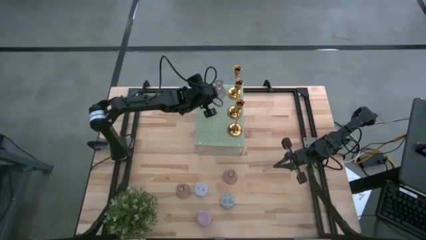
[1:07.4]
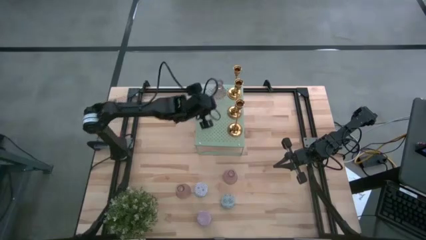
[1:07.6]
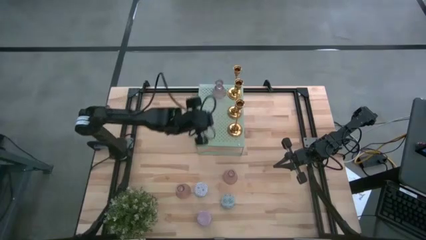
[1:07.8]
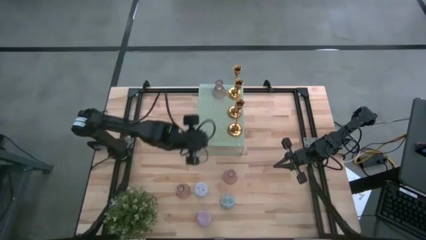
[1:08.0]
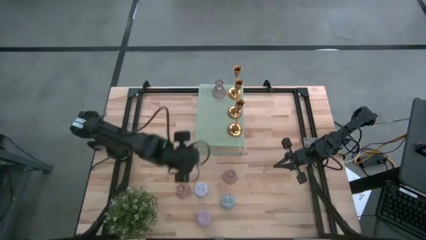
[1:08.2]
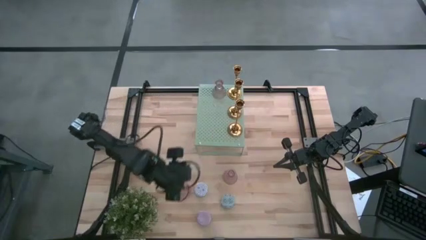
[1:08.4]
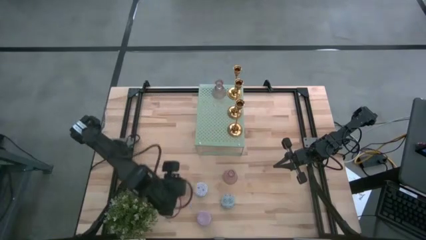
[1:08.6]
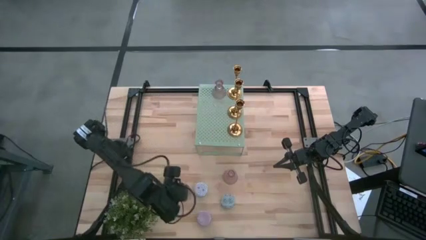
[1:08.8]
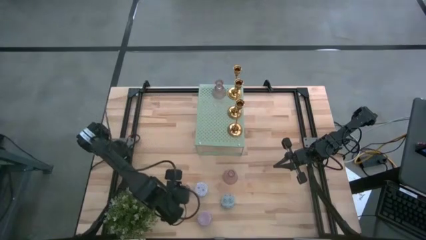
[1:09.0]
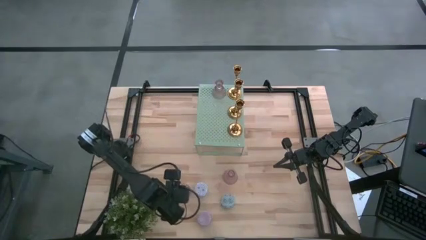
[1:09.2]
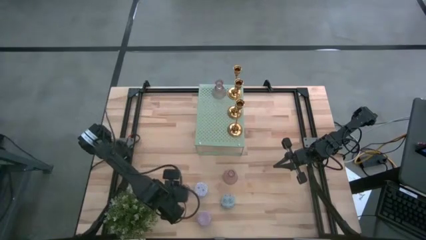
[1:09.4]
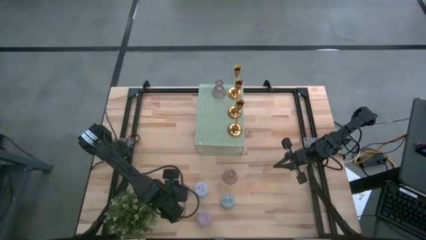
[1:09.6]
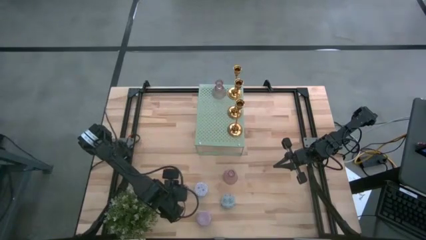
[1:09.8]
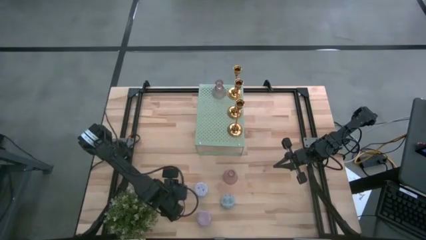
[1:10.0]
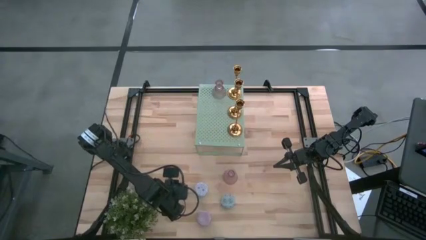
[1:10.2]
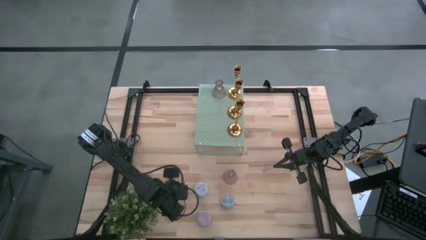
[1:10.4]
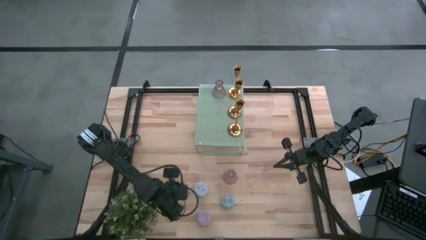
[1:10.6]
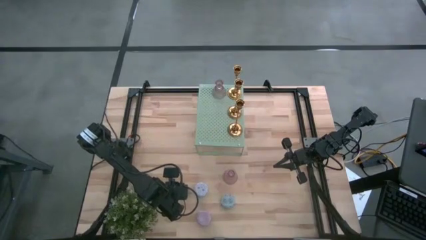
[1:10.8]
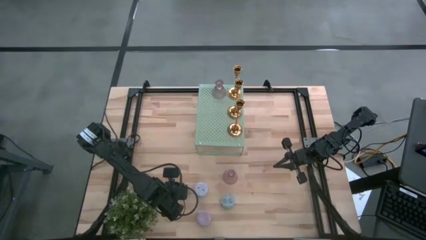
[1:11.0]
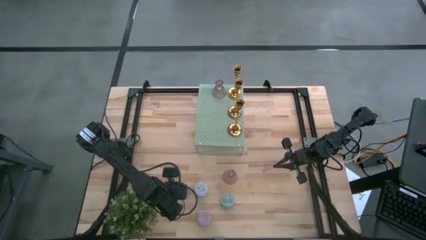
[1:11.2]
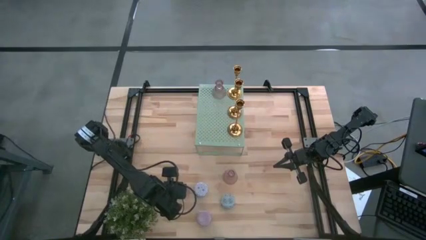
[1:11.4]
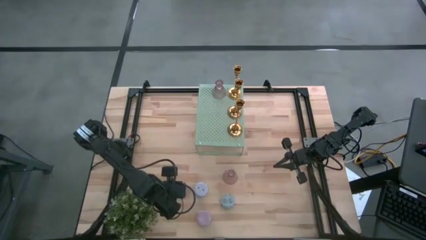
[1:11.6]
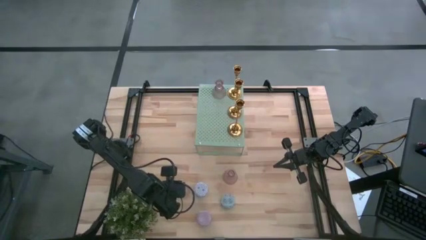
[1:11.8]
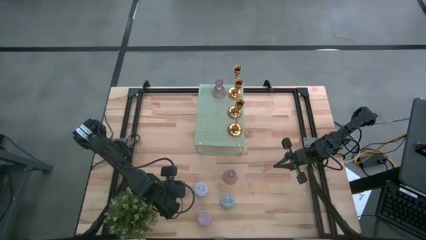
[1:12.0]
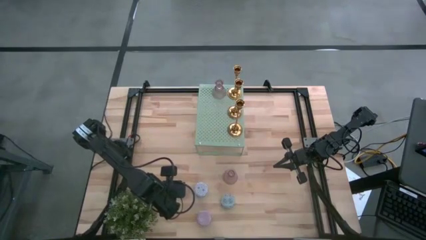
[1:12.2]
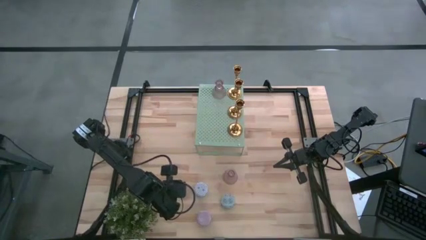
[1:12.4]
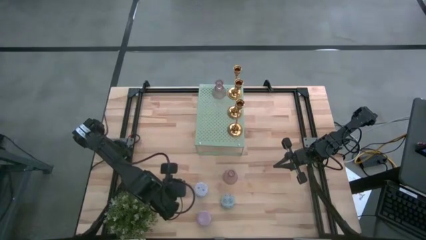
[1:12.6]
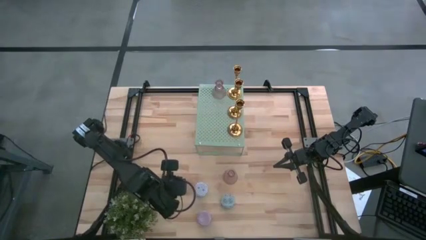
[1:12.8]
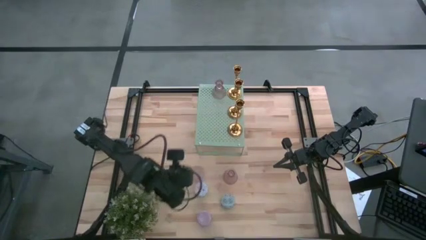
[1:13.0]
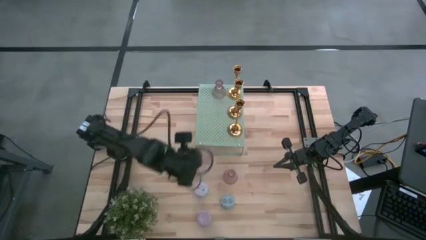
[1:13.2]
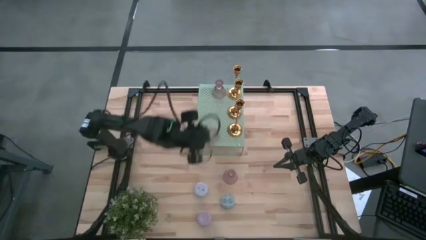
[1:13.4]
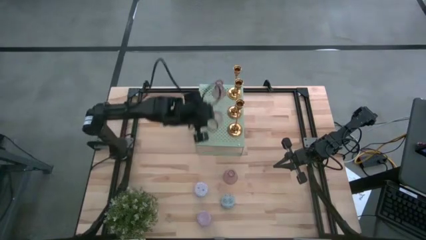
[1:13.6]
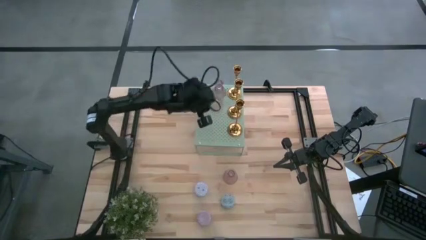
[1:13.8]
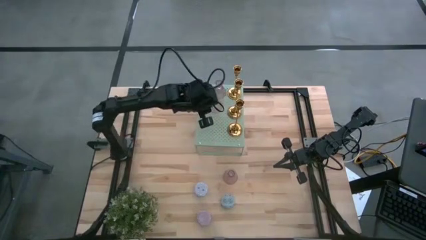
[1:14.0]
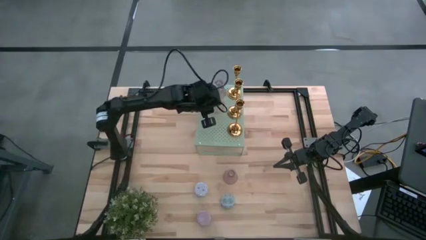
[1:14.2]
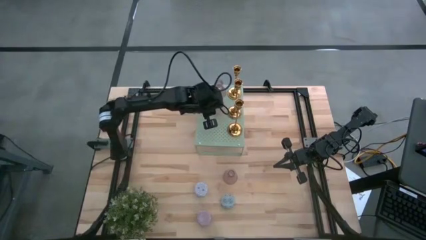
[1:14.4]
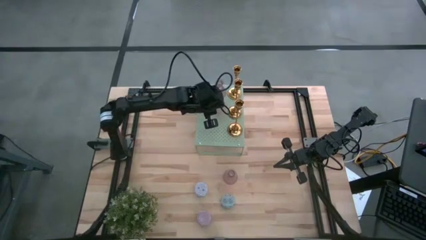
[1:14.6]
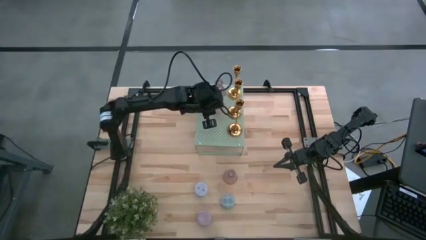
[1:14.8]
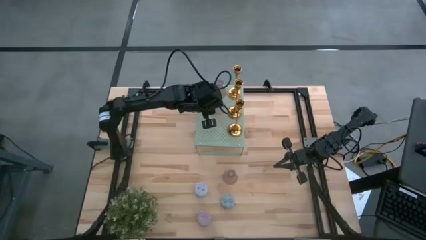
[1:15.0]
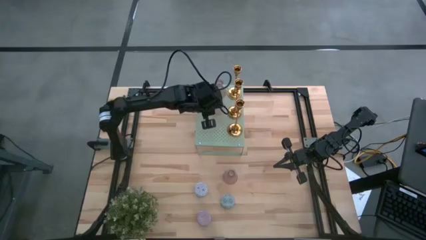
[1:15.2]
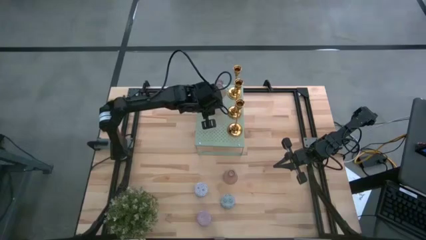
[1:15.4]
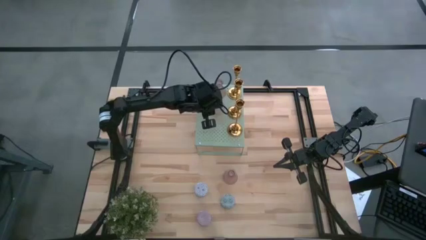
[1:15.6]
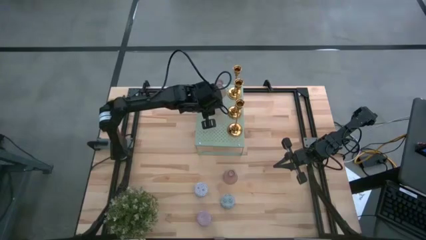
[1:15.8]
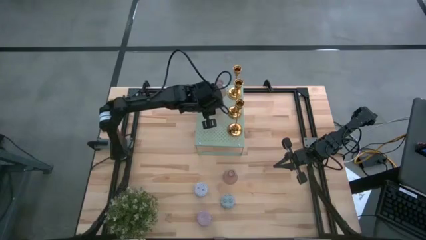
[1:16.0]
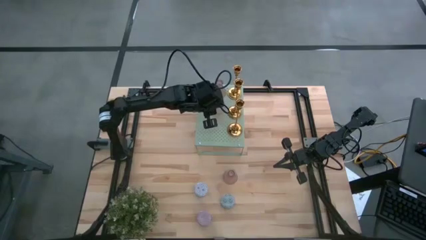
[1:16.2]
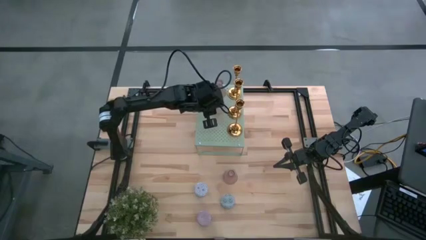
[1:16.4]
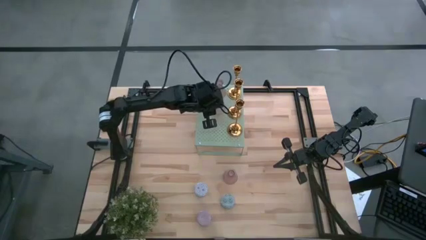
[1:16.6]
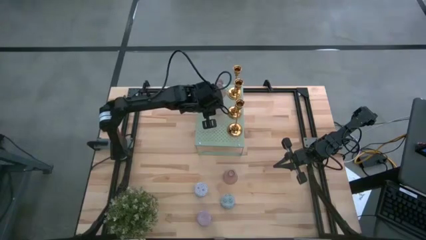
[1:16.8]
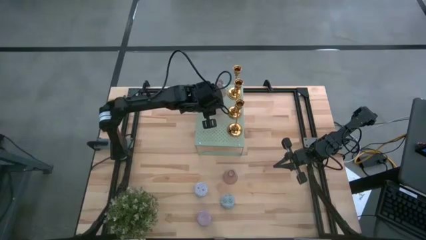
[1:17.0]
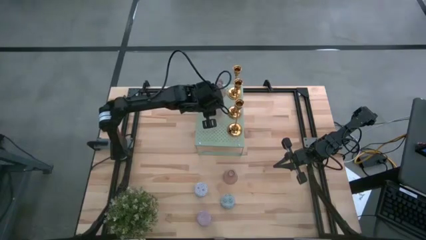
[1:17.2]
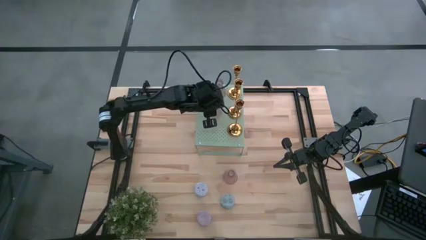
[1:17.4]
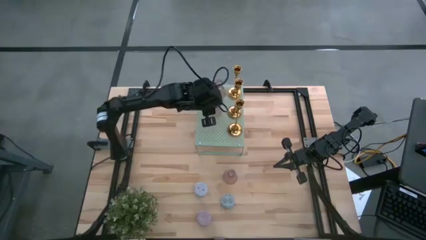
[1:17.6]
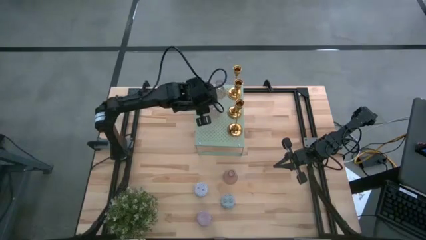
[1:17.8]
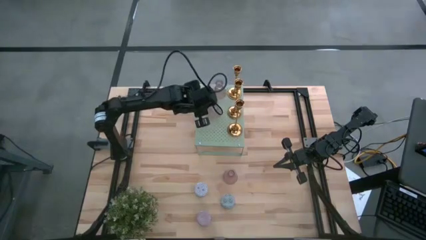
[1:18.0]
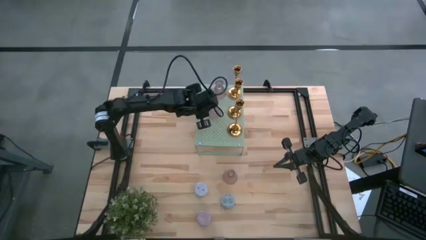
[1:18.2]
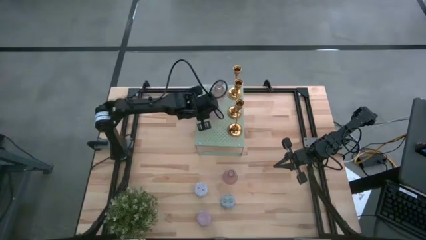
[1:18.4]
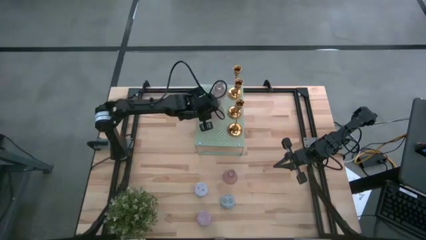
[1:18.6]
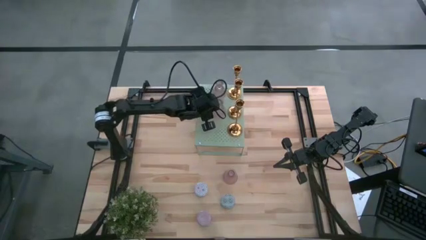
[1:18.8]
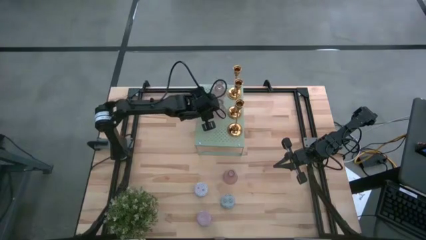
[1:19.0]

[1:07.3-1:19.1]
Task: Pick & Place candle stick holders
Put the bottom pink candle holder on the shelf aligned with other pink candle holder
